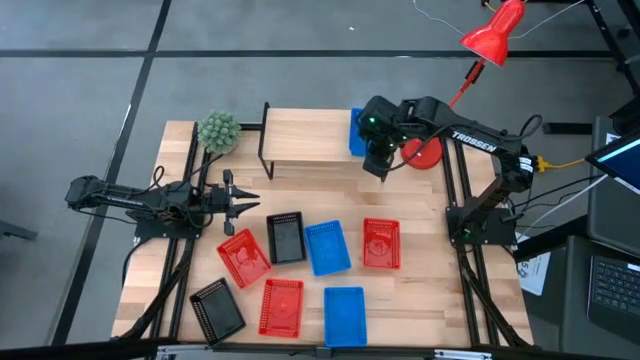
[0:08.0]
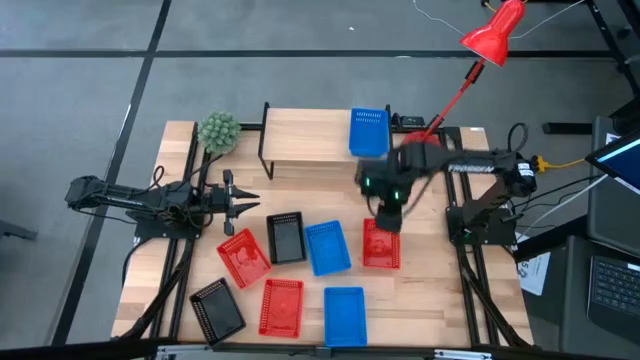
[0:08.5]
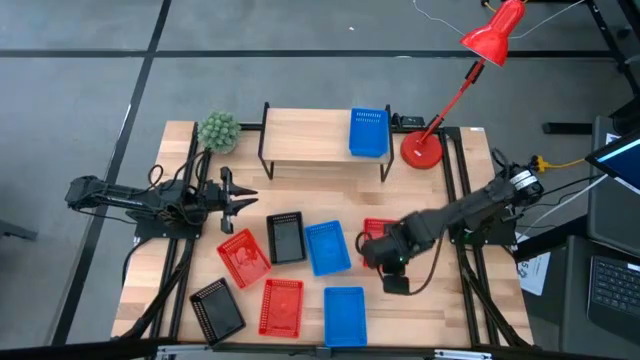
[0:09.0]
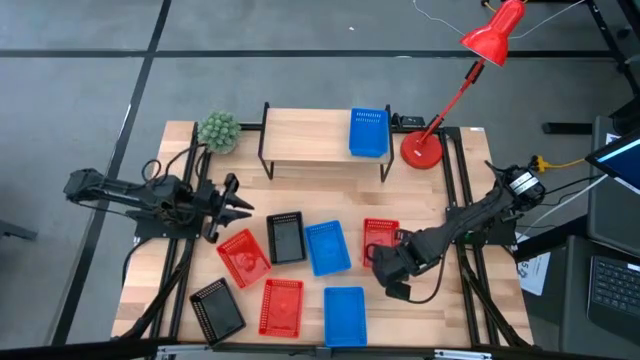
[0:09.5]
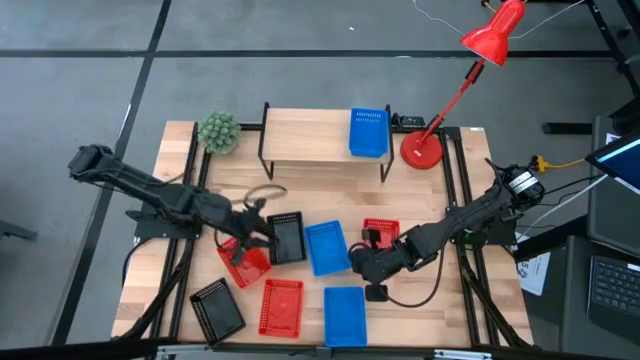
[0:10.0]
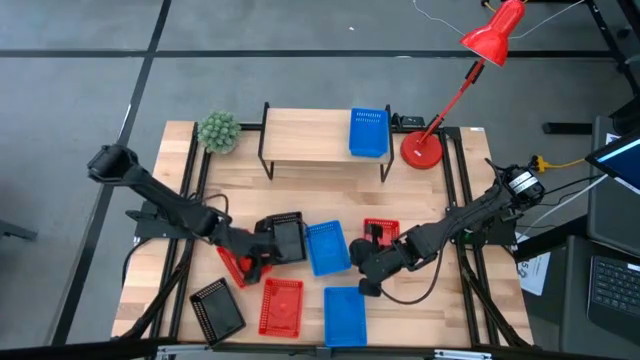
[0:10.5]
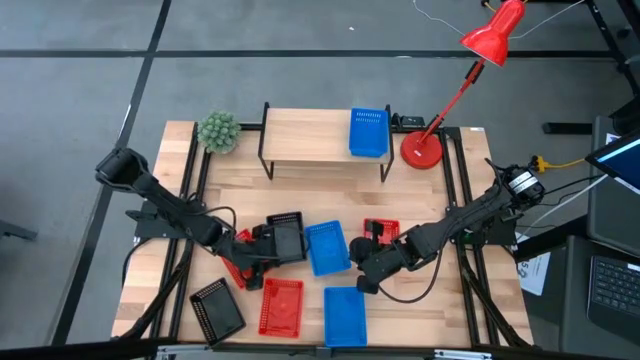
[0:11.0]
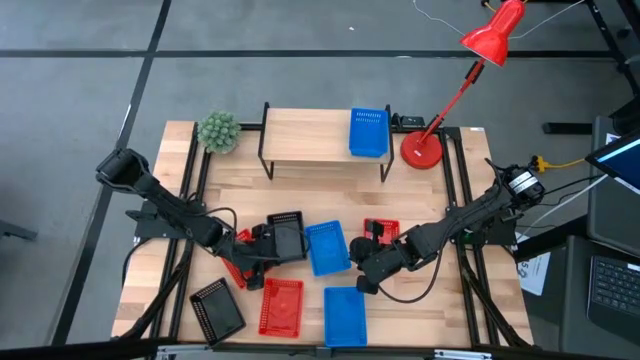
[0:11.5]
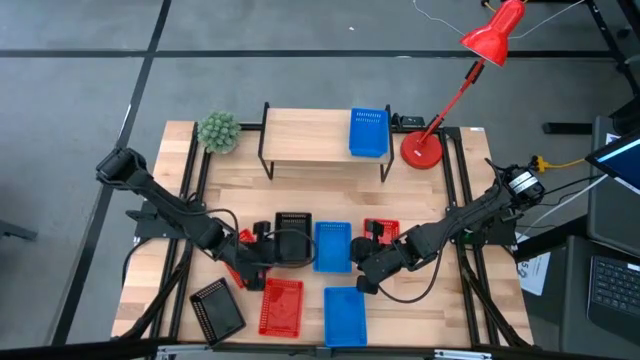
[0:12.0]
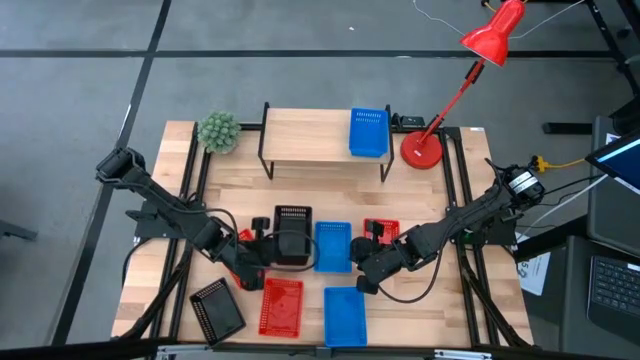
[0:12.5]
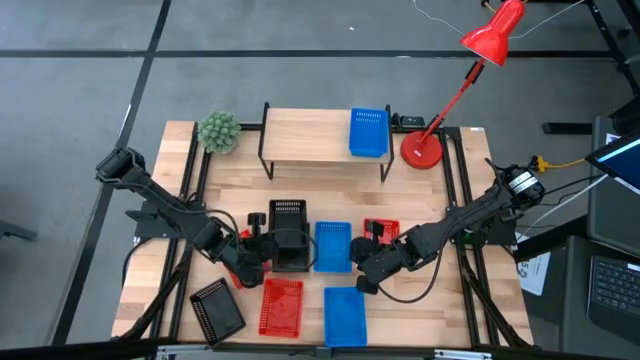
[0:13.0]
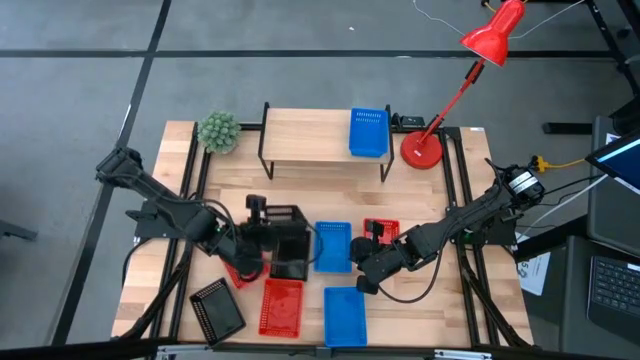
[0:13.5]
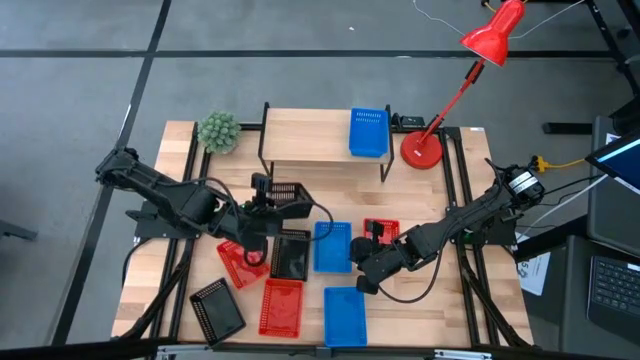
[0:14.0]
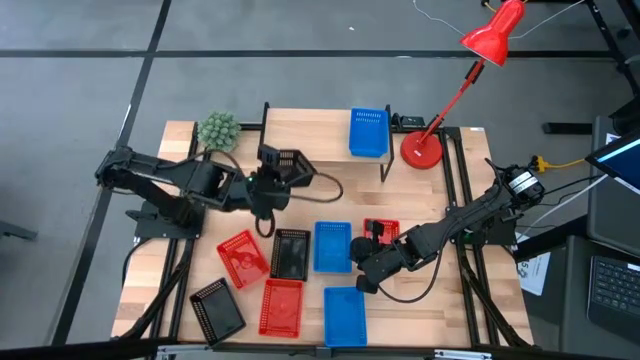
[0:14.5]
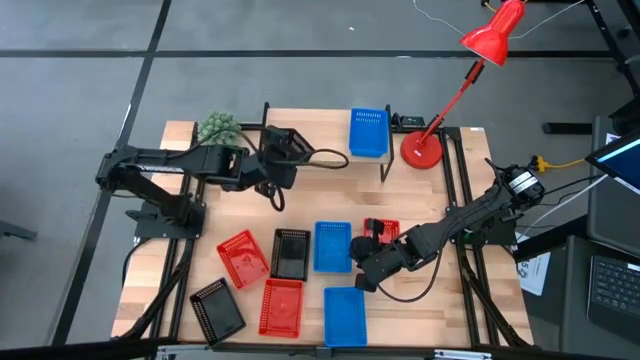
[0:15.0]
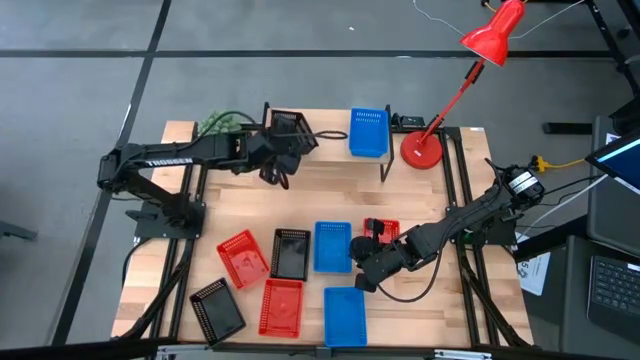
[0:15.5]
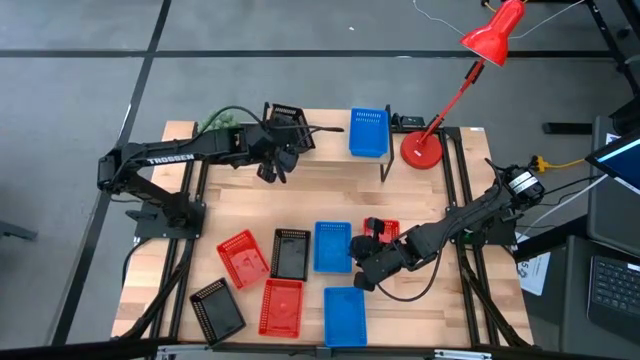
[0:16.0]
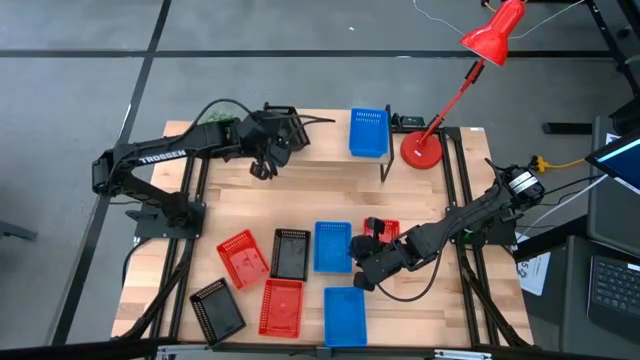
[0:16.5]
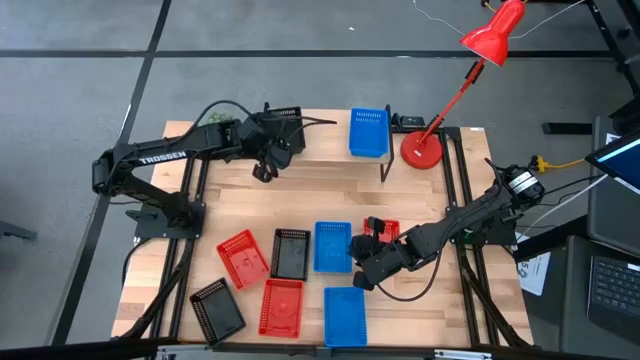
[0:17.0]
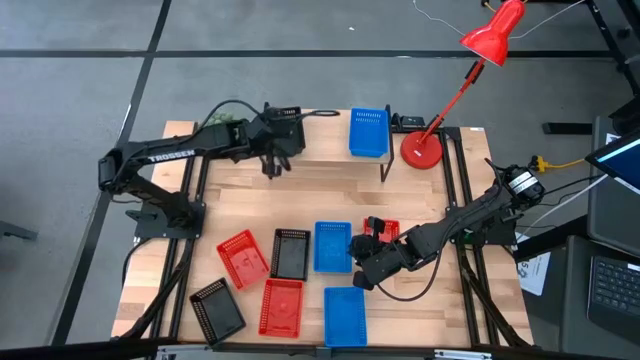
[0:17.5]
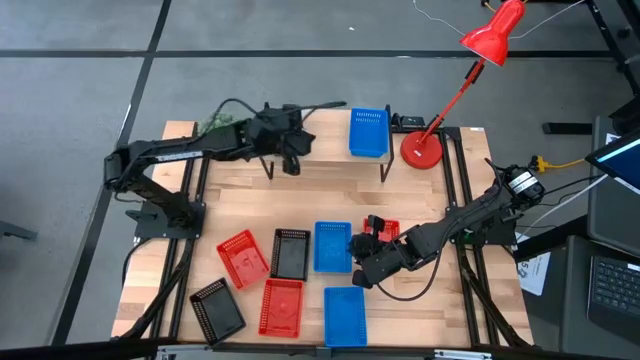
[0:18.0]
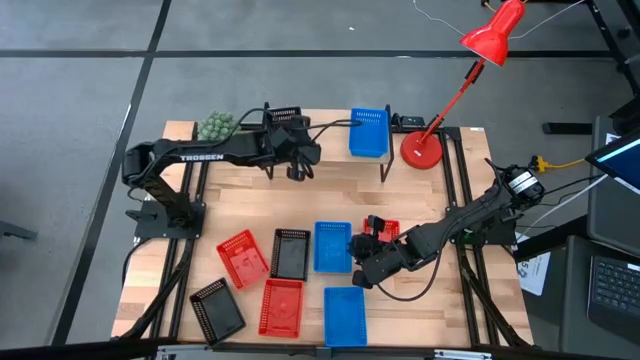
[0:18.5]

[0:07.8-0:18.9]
Task: Stack baskets on shelf by color
Put the top black bin on the shelf

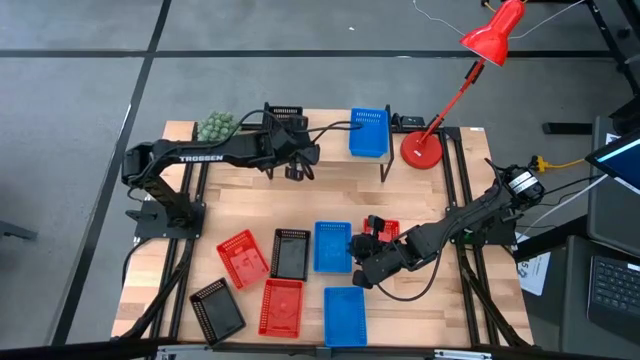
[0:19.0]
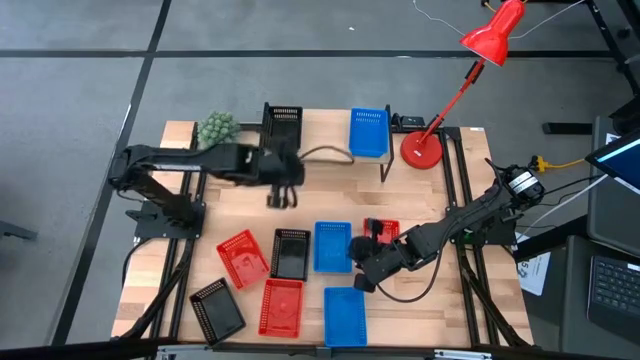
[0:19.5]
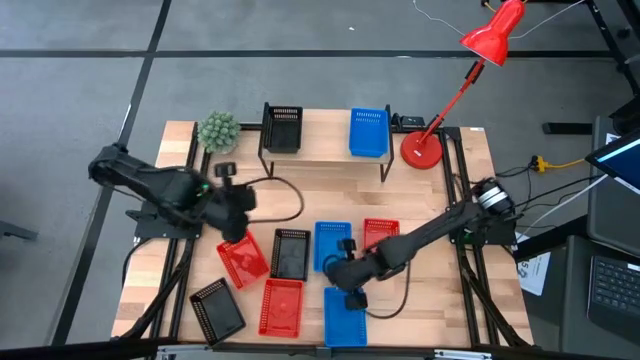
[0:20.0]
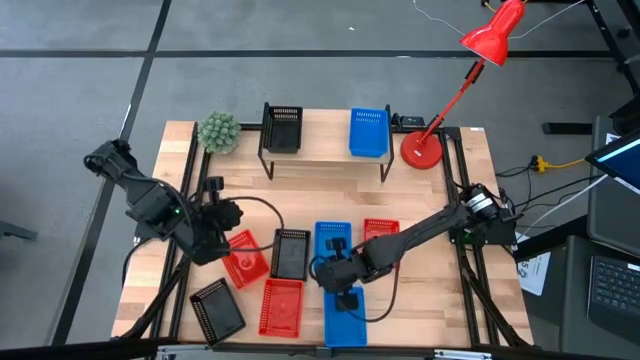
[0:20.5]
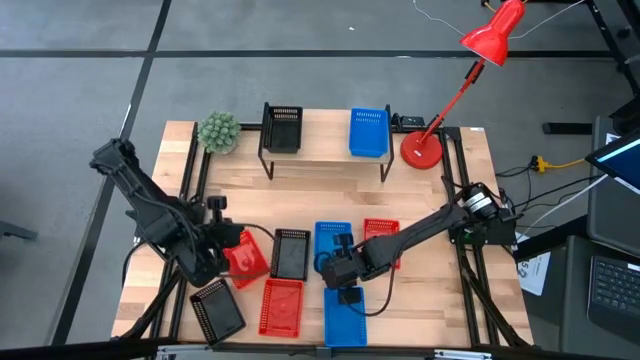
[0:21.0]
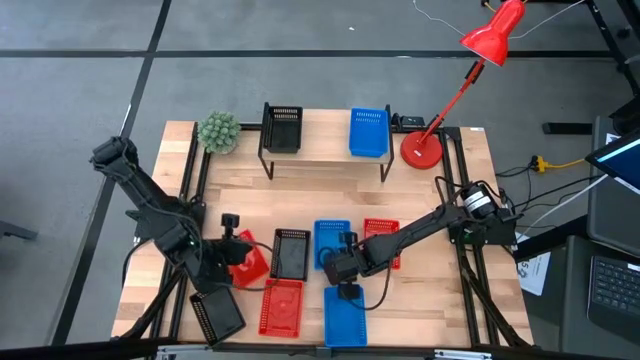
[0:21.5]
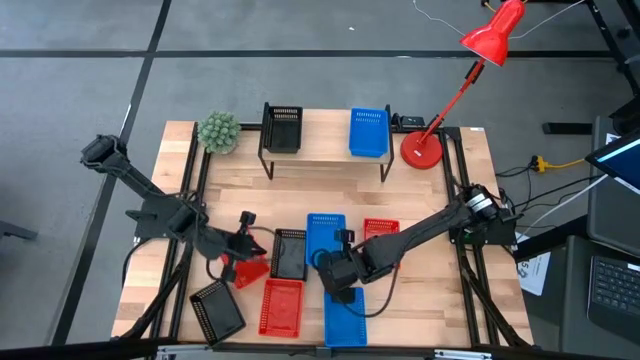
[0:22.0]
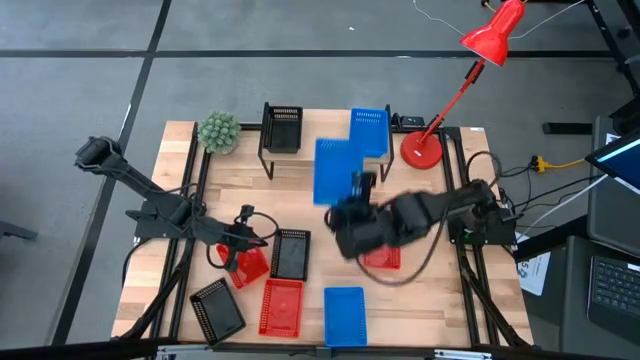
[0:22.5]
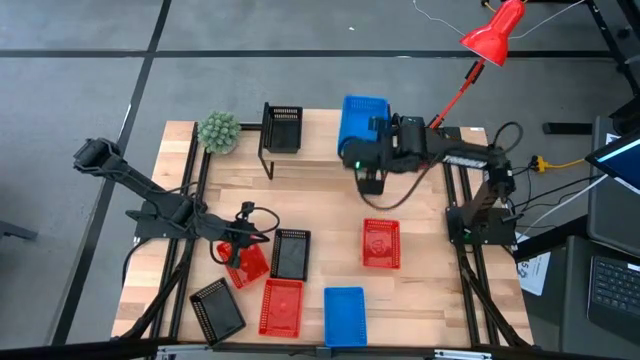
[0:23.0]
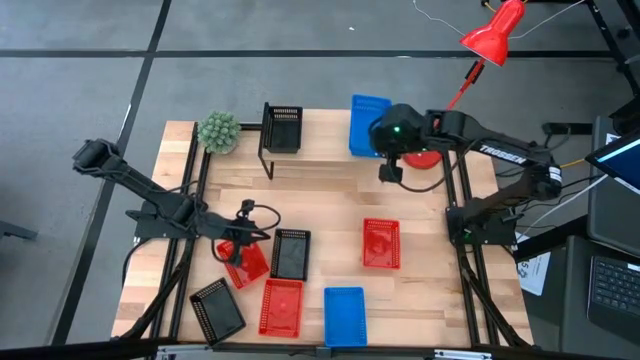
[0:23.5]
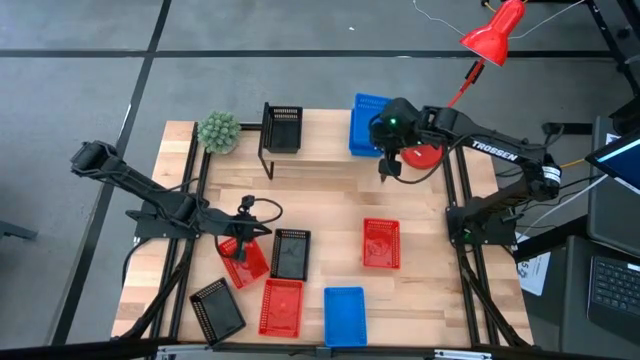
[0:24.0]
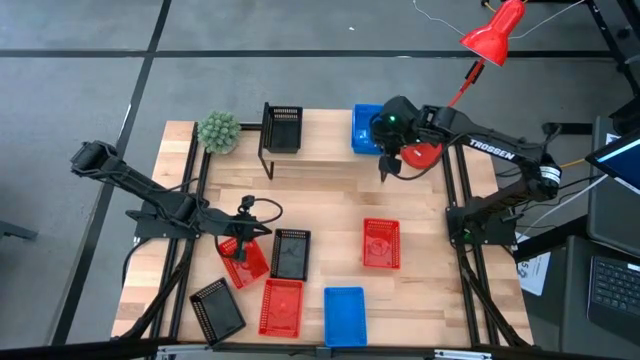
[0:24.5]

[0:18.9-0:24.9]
Stack the top blue bin on the blue bin on the shelf

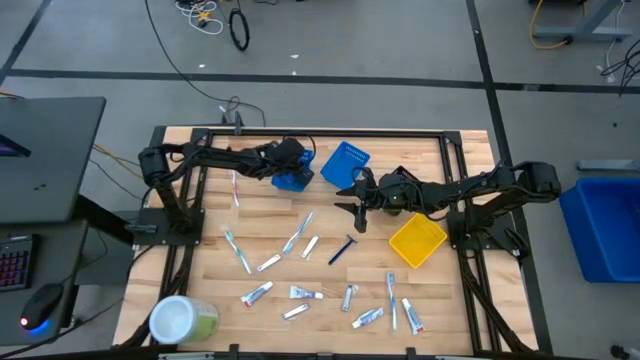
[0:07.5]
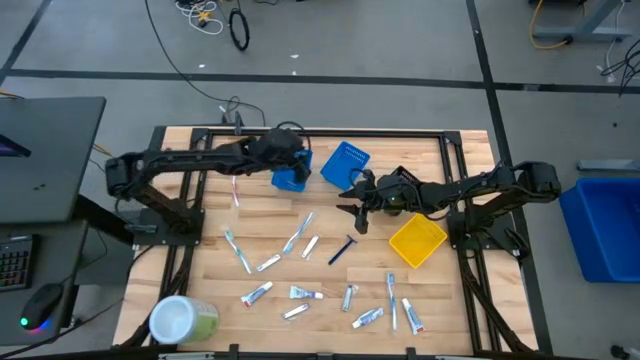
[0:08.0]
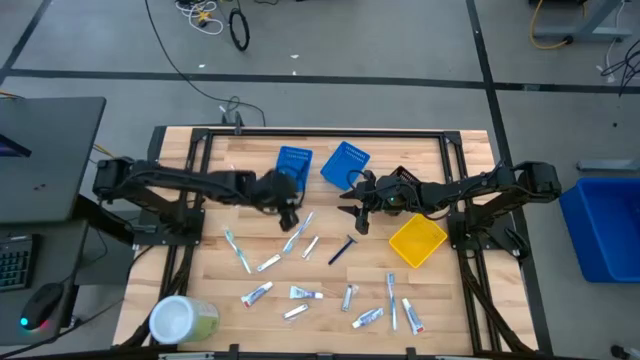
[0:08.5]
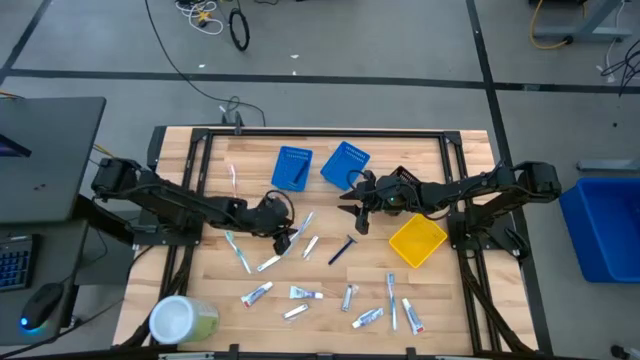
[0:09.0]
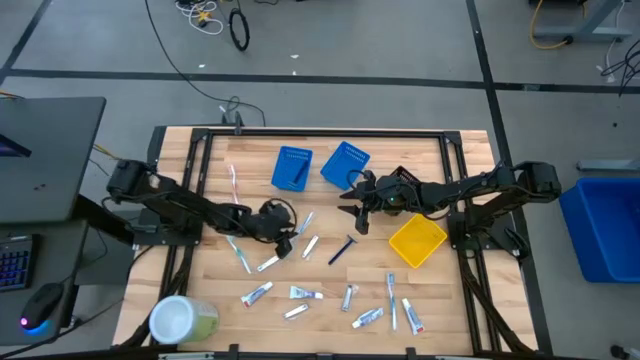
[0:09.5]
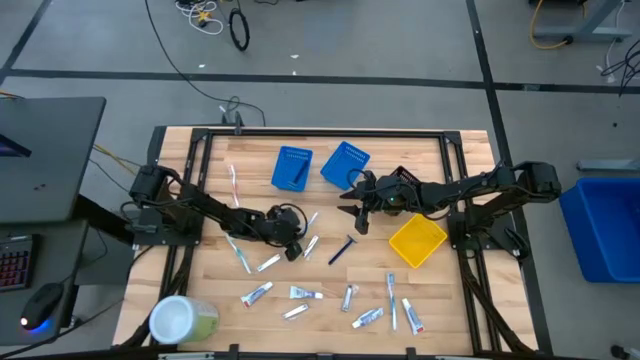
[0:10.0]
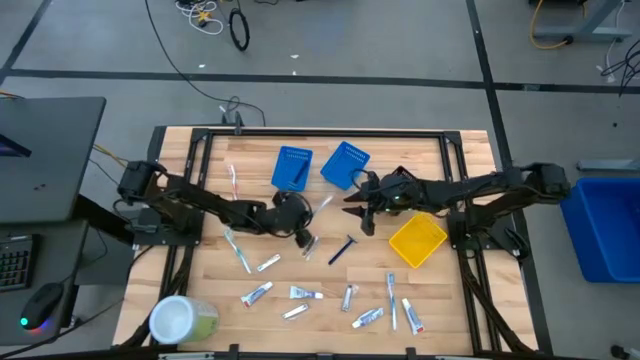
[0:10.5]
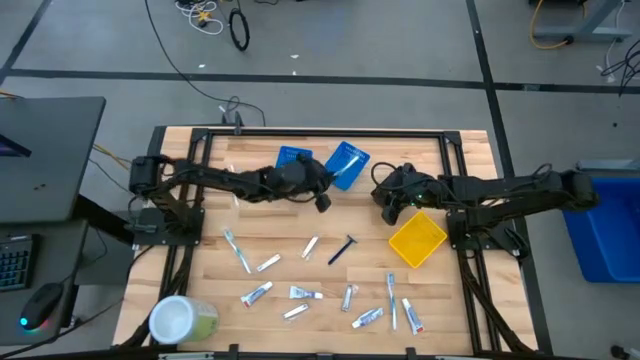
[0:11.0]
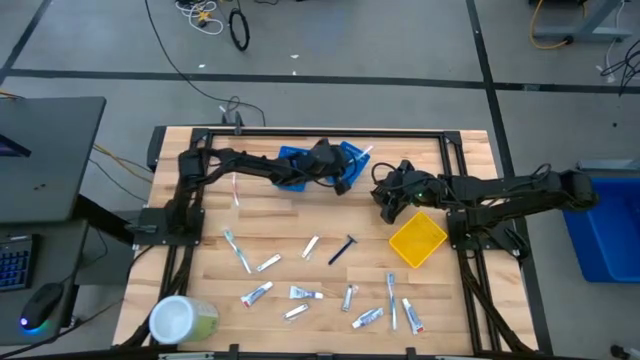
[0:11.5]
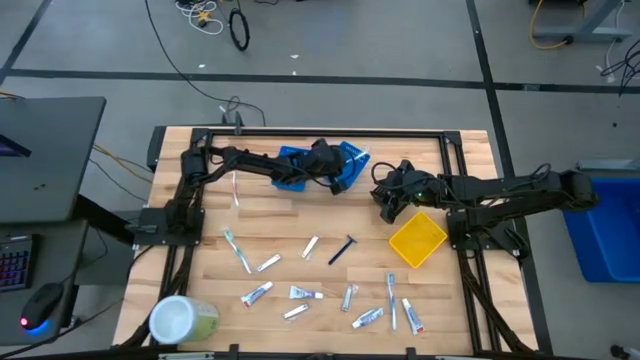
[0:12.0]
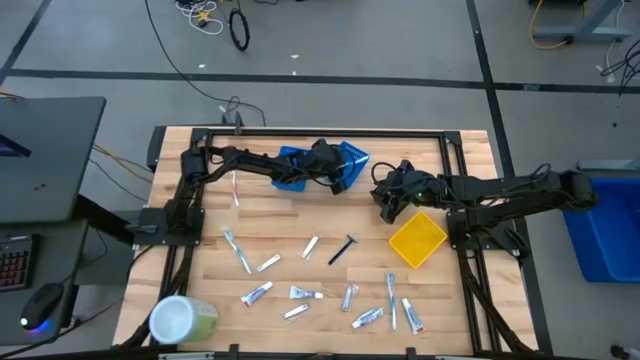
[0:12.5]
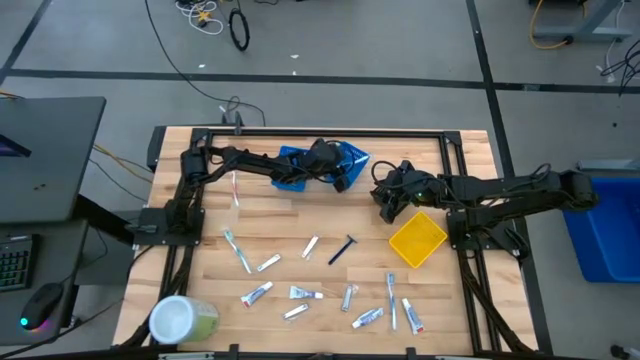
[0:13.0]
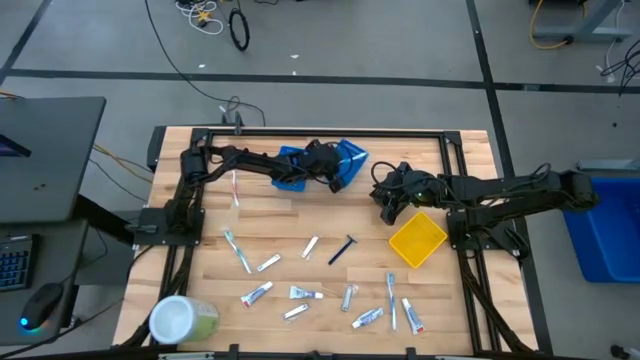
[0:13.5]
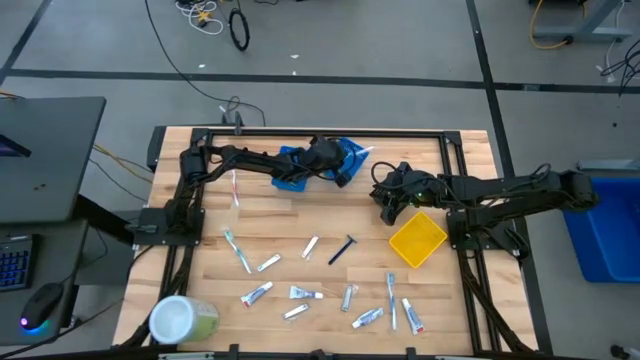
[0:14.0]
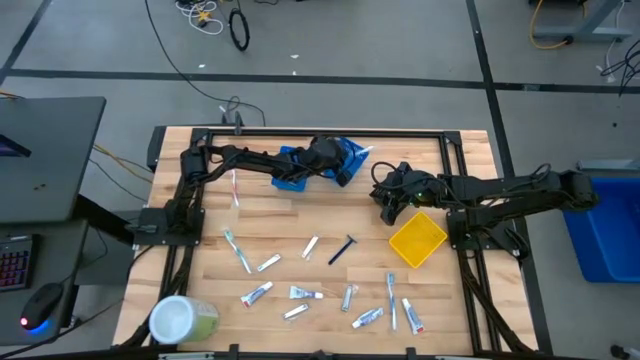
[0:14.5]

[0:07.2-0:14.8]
Task: Pick & Place Travel size toiletries
Put the blue toothbrush into the right blue basket
